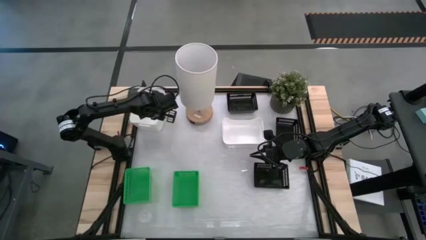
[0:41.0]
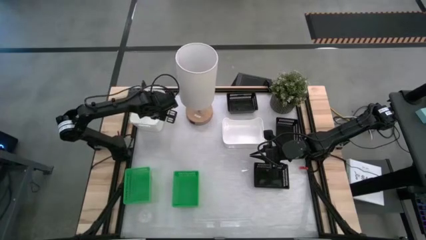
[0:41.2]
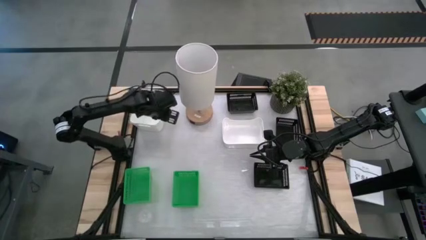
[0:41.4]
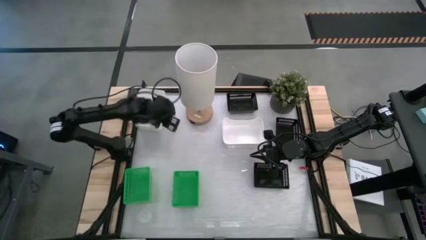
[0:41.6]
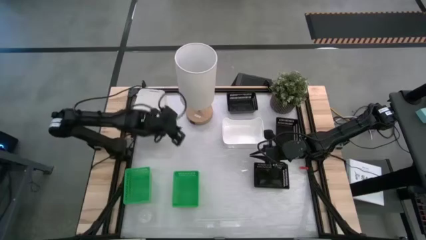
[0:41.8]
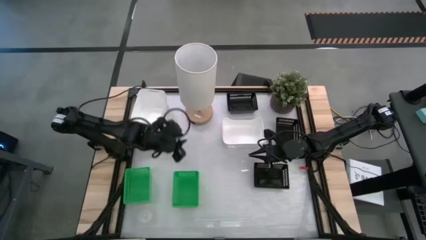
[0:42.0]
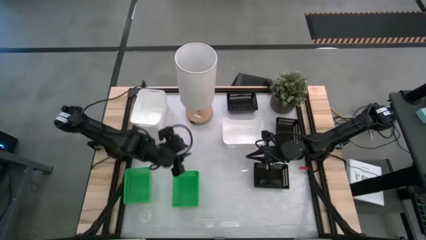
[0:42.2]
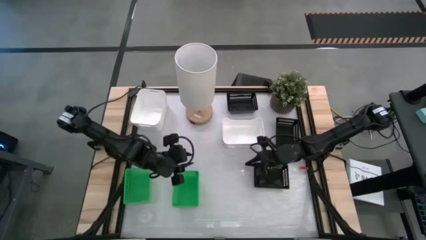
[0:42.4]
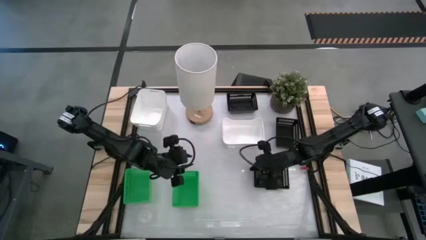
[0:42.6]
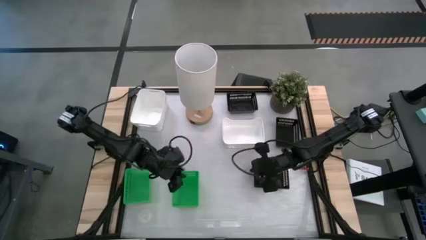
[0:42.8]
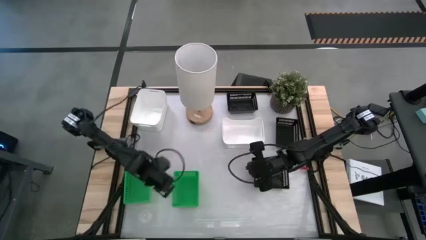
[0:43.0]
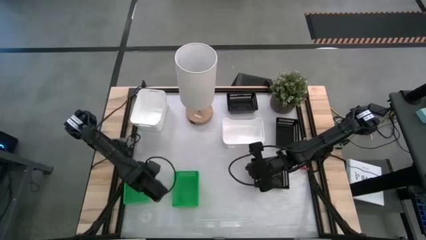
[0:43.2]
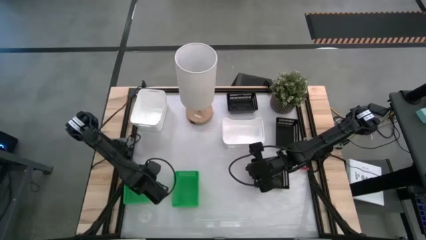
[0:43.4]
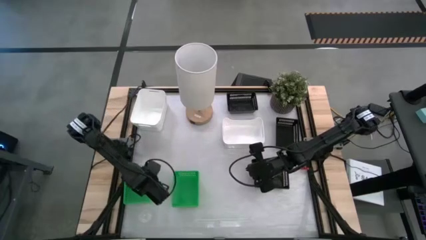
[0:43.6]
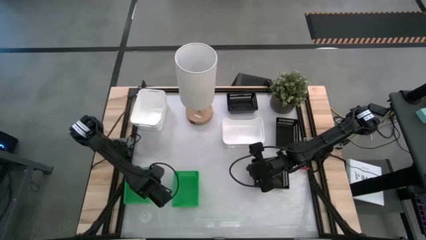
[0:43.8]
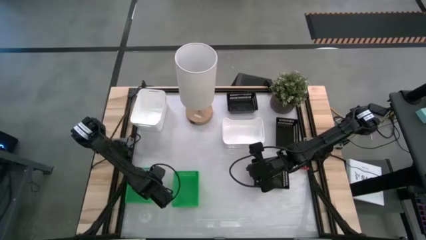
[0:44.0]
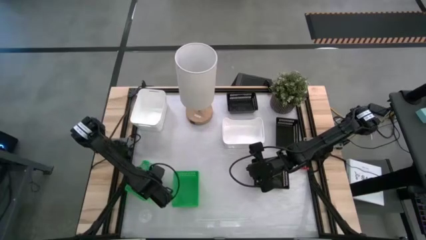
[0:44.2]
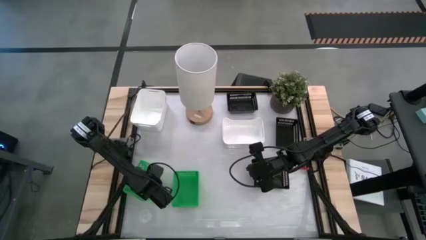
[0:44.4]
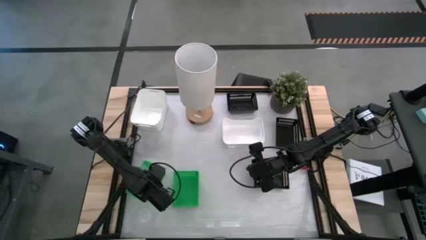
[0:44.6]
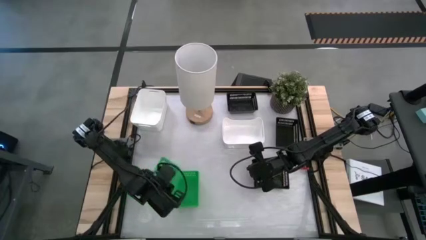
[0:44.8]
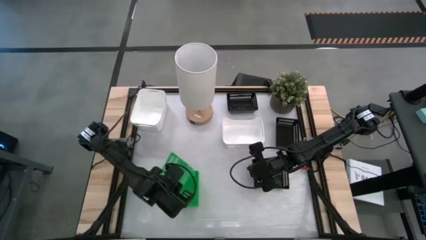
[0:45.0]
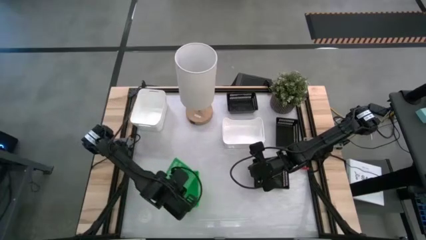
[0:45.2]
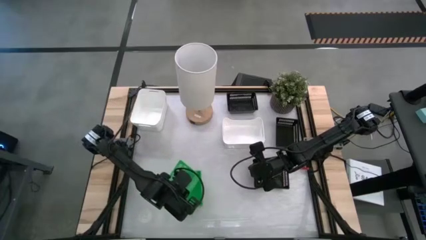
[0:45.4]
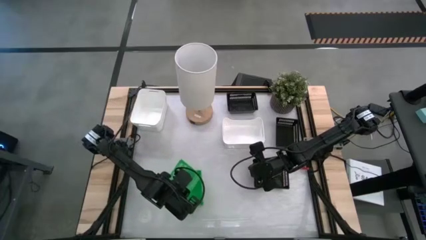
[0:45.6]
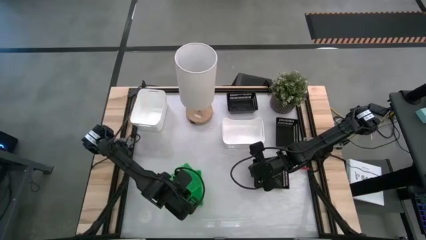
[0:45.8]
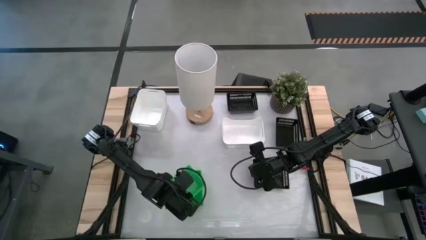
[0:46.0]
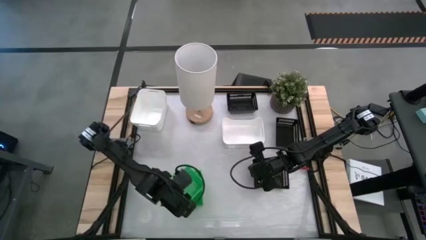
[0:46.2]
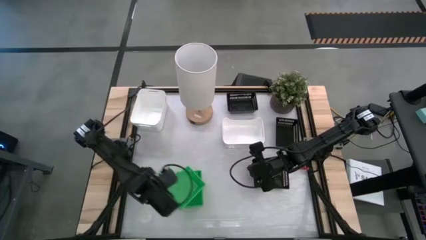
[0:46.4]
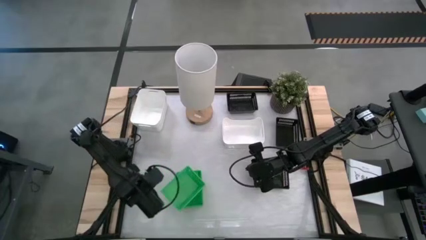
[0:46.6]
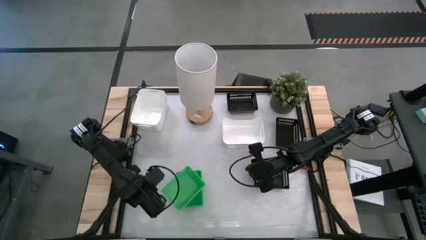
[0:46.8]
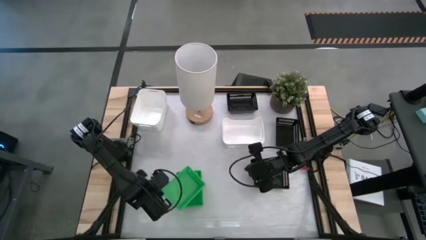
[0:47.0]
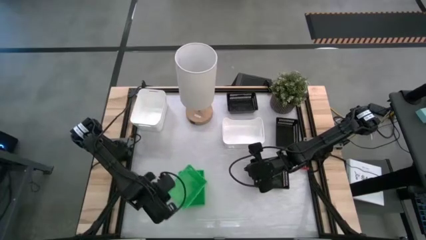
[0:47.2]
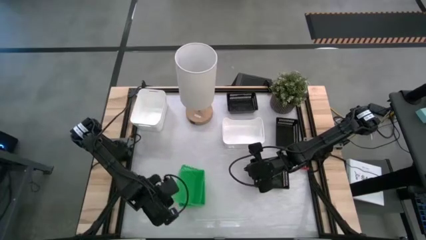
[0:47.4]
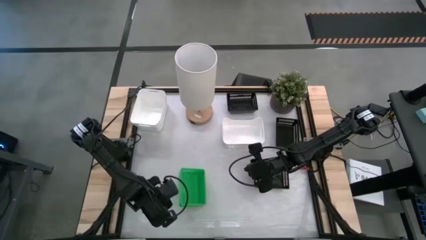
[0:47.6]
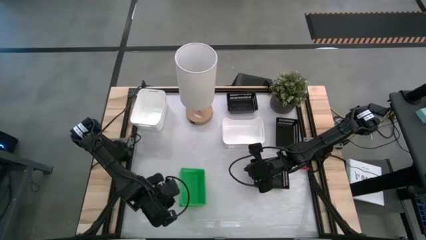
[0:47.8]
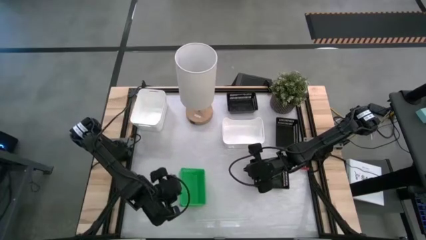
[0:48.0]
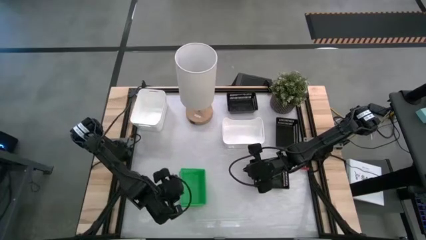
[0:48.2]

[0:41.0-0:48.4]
Stack the green bin on the green bins

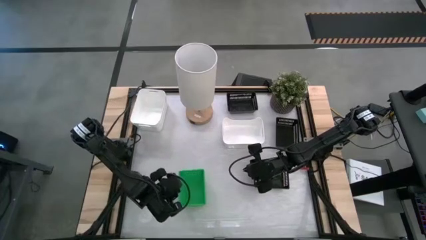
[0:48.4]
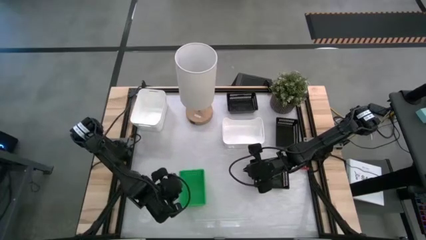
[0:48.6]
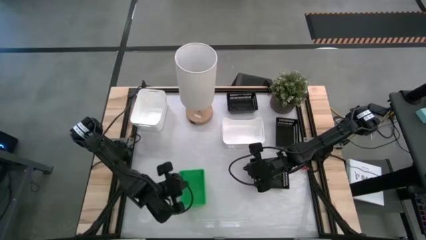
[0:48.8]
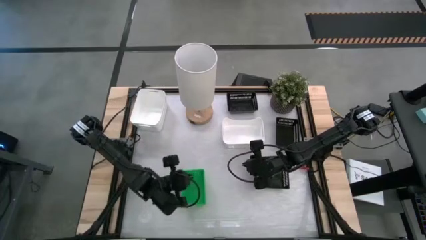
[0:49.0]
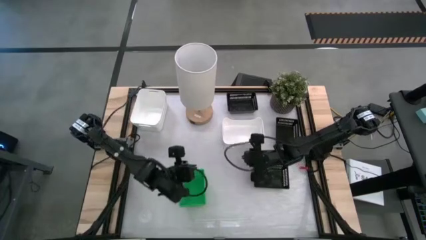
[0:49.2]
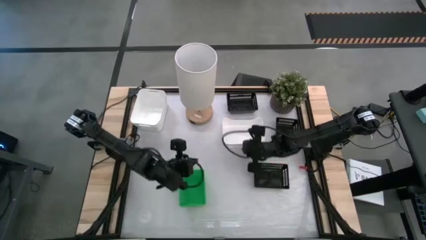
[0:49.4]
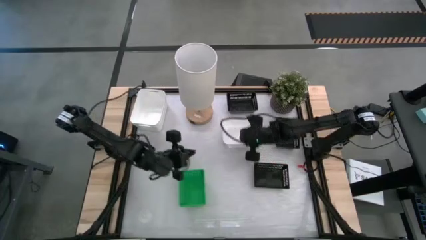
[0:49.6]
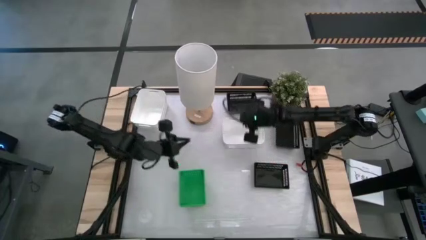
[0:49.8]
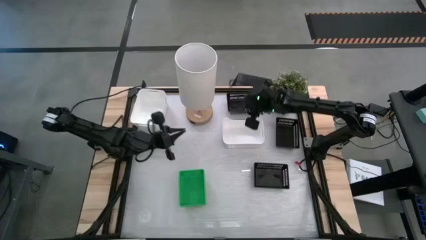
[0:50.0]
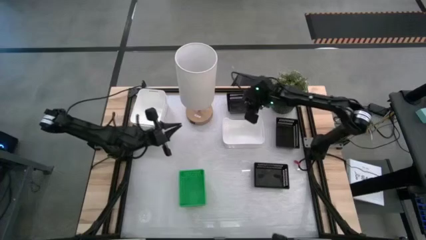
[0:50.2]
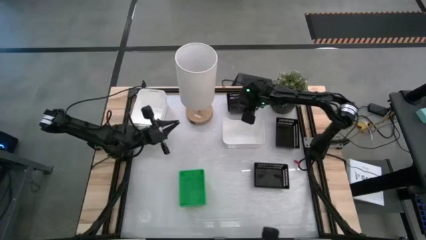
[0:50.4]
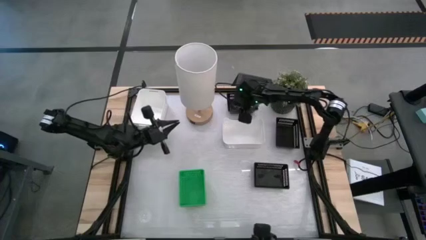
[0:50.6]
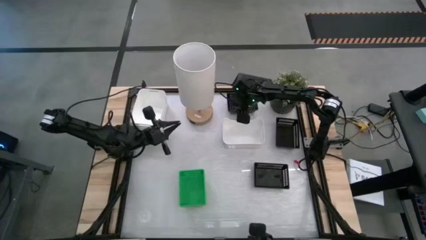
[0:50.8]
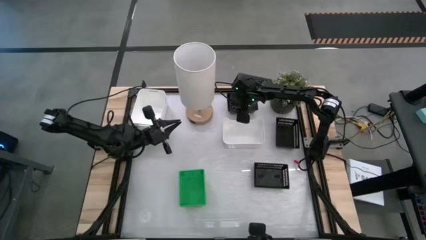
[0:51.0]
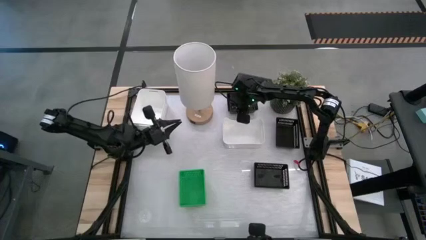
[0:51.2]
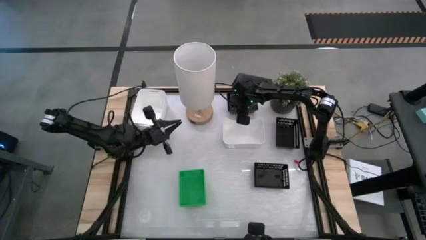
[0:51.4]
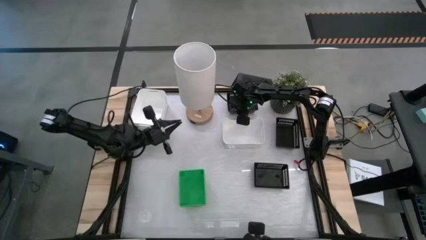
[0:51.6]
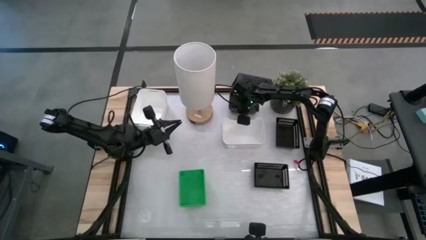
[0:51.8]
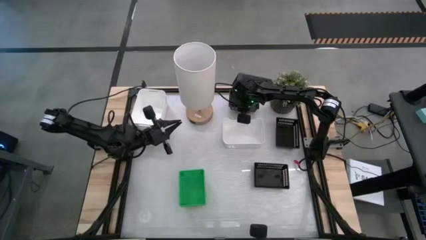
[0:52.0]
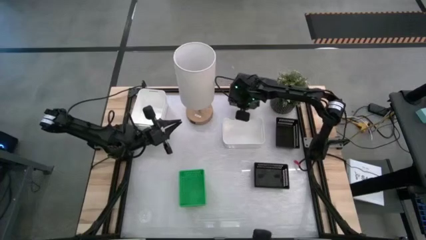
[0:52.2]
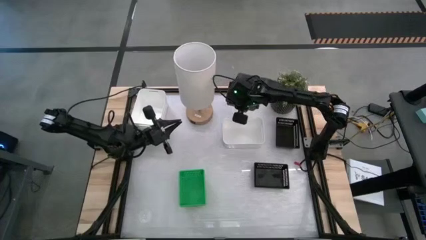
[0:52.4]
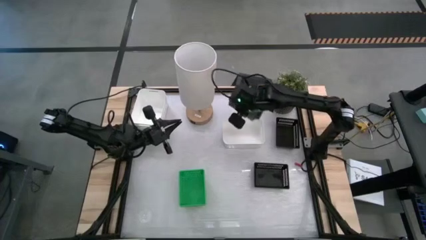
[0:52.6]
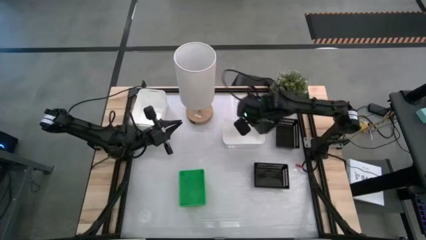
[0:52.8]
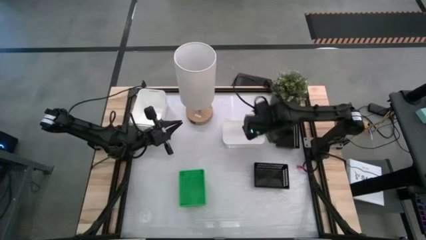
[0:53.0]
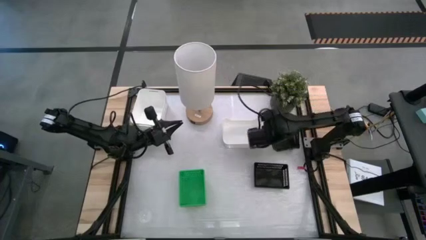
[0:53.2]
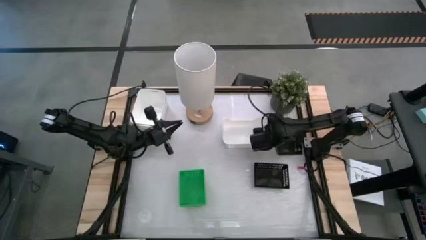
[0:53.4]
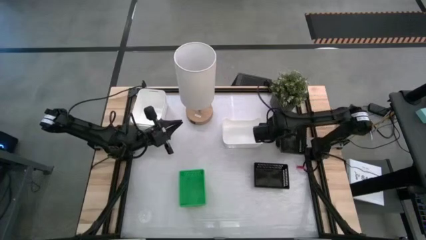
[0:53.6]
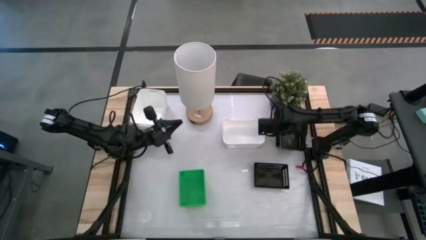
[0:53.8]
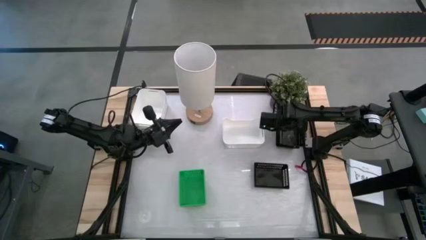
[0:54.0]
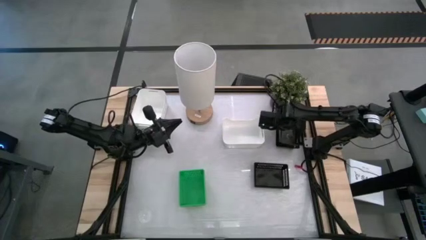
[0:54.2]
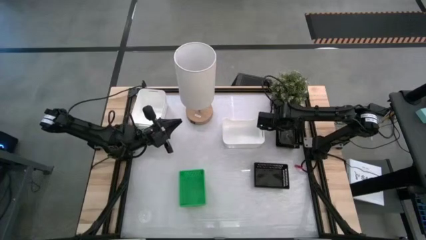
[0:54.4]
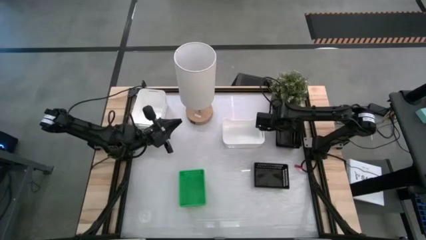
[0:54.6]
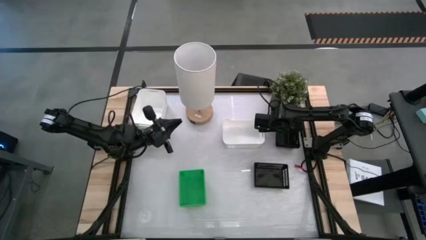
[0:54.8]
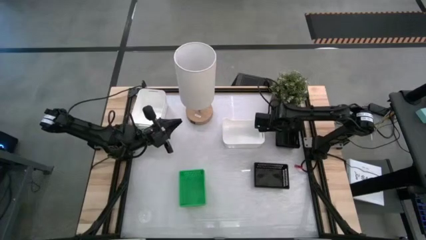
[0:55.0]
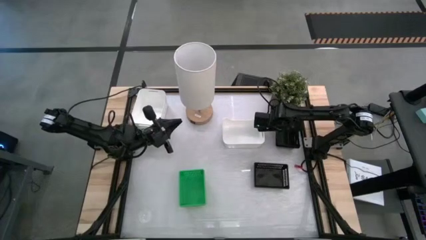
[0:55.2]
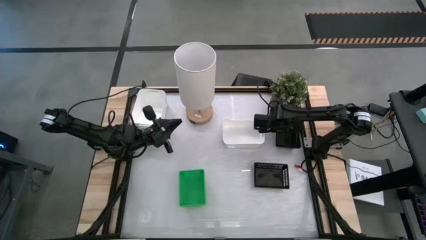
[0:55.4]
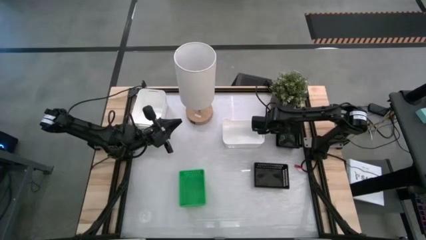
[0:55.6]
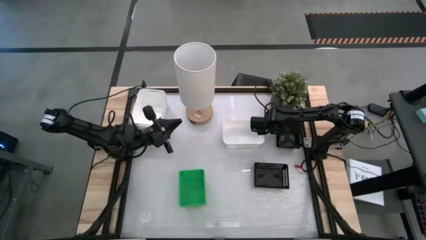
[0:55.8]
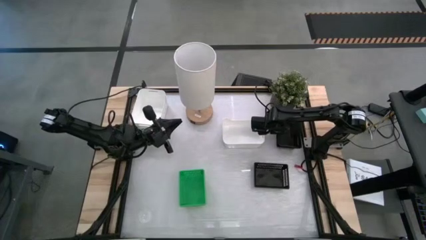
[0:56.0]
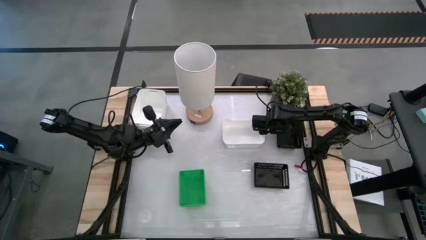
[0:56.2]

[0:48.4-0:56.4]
Stack the top black bin on the middle right black bin
